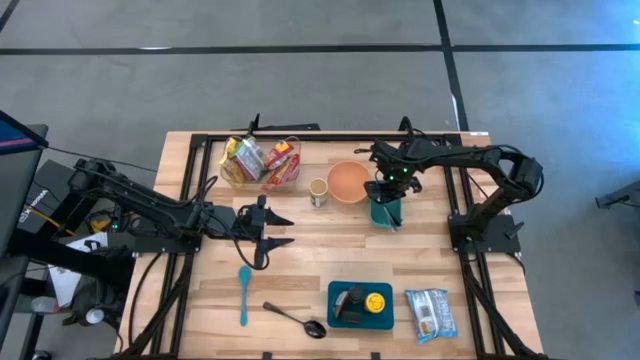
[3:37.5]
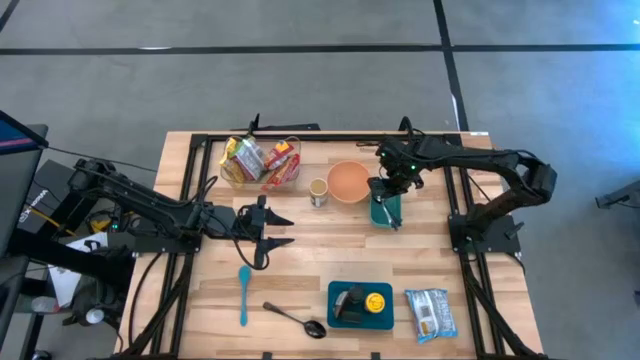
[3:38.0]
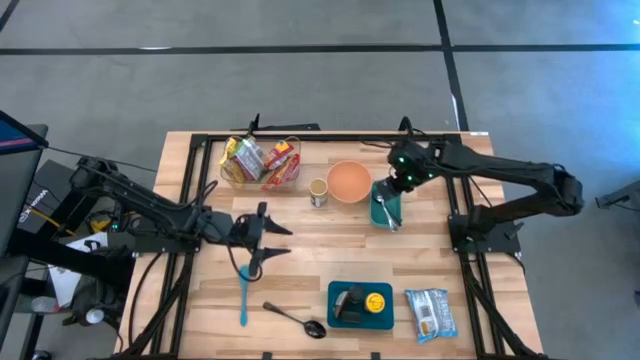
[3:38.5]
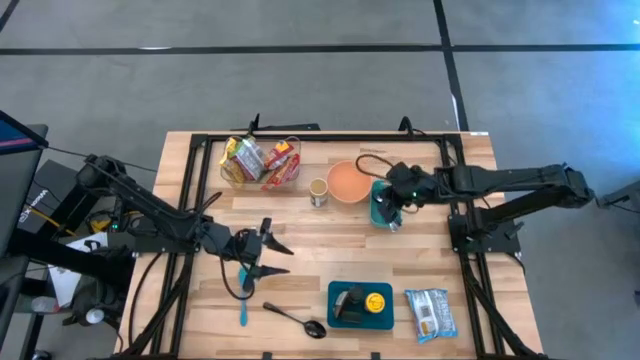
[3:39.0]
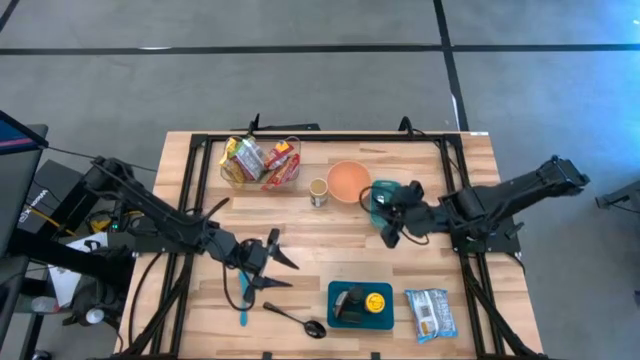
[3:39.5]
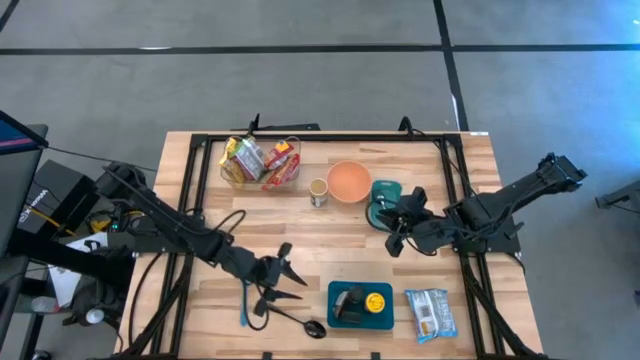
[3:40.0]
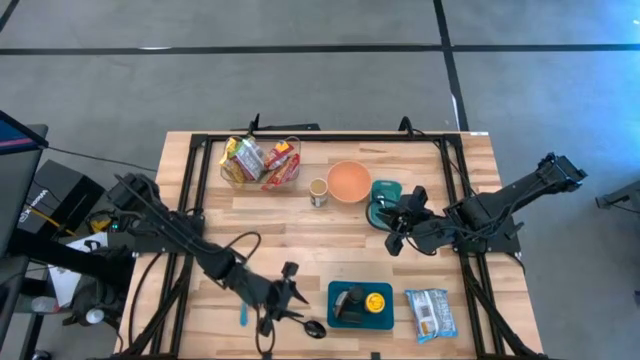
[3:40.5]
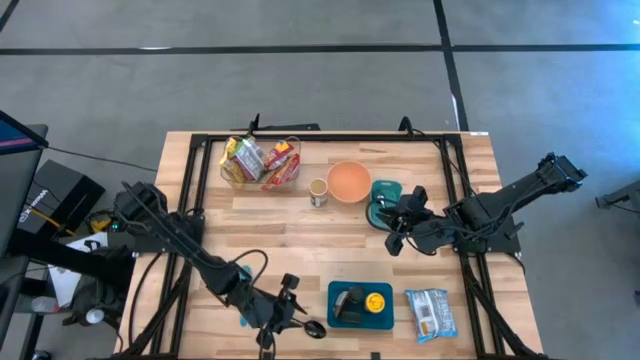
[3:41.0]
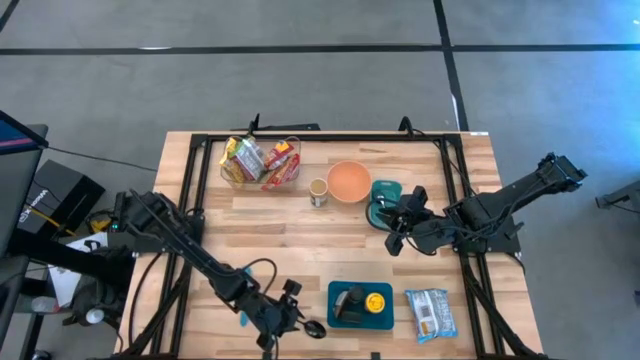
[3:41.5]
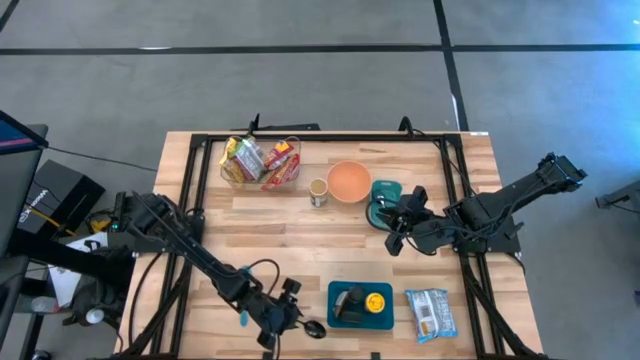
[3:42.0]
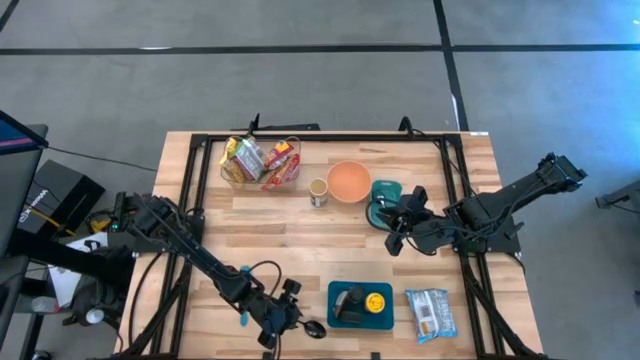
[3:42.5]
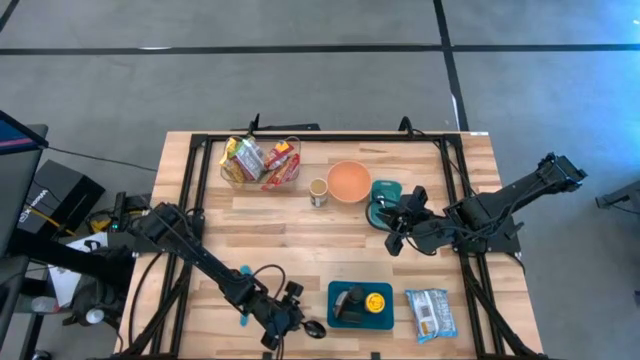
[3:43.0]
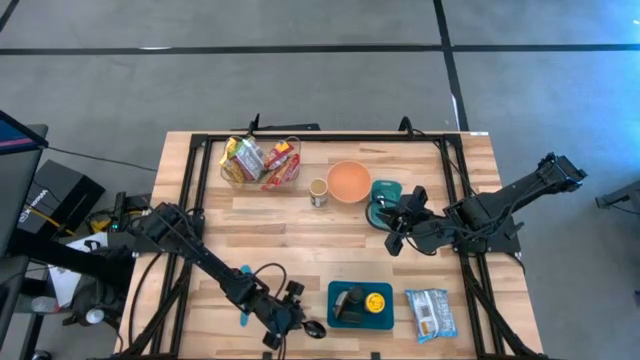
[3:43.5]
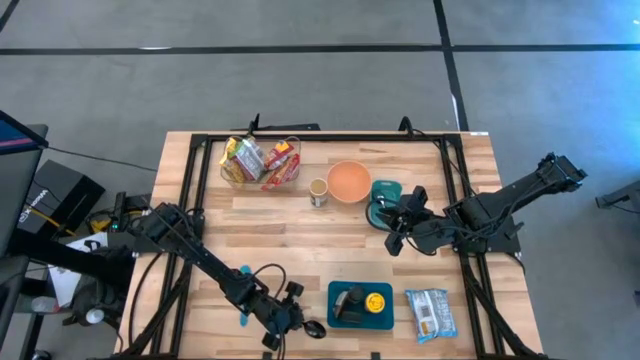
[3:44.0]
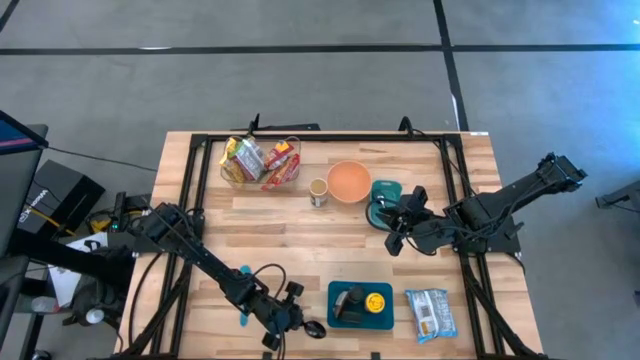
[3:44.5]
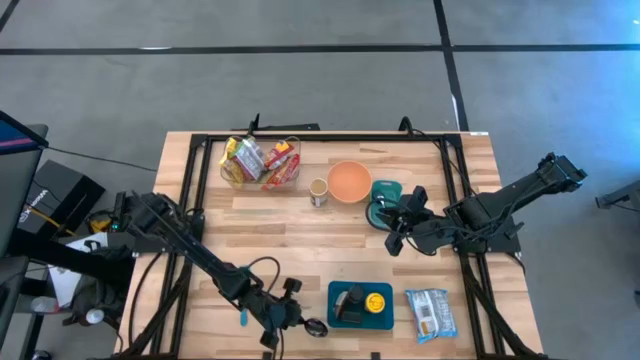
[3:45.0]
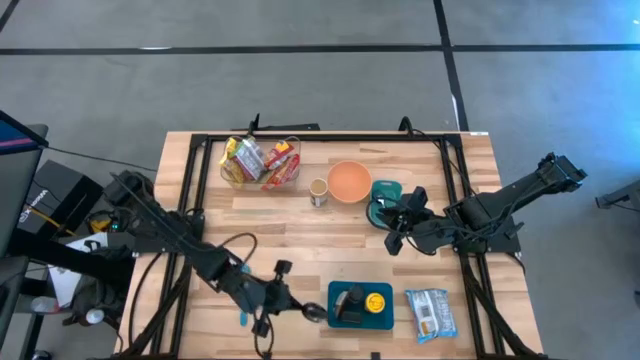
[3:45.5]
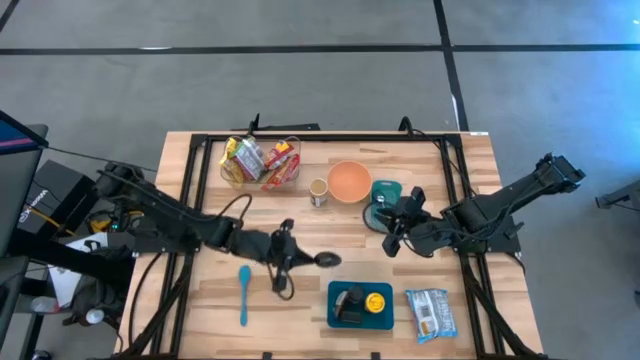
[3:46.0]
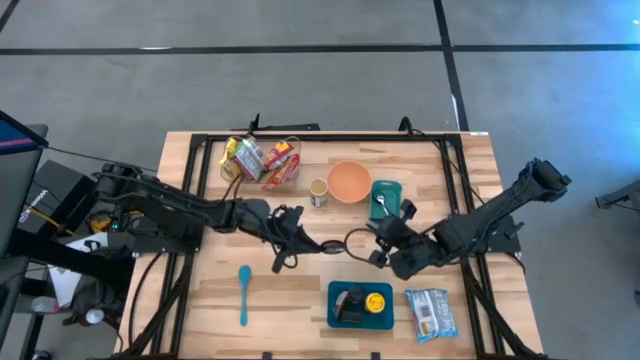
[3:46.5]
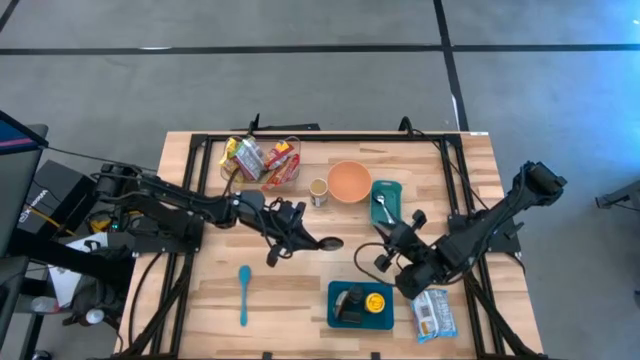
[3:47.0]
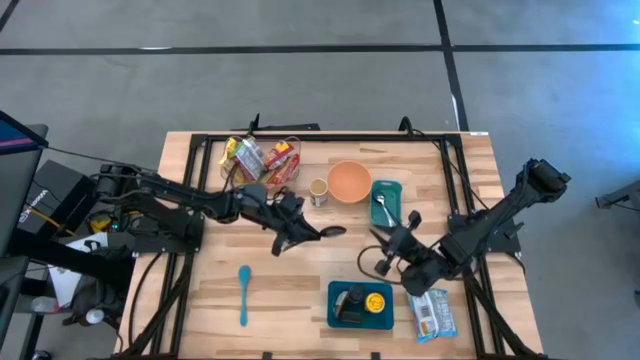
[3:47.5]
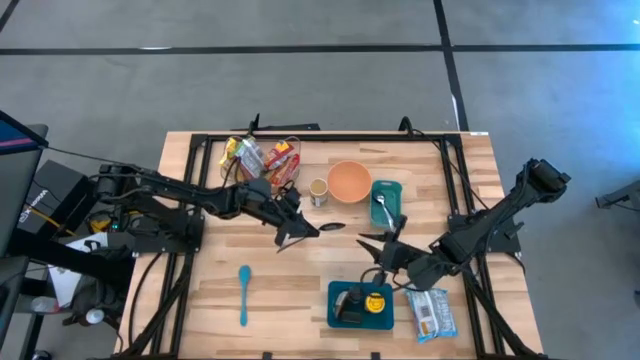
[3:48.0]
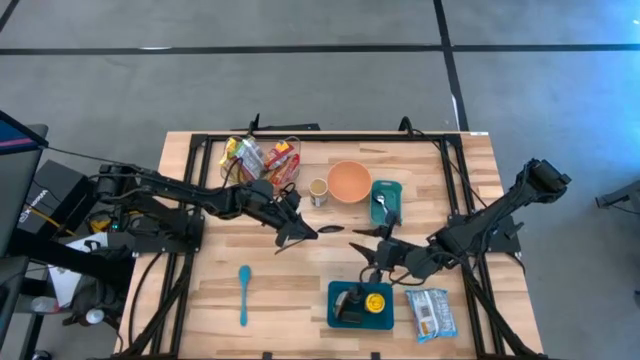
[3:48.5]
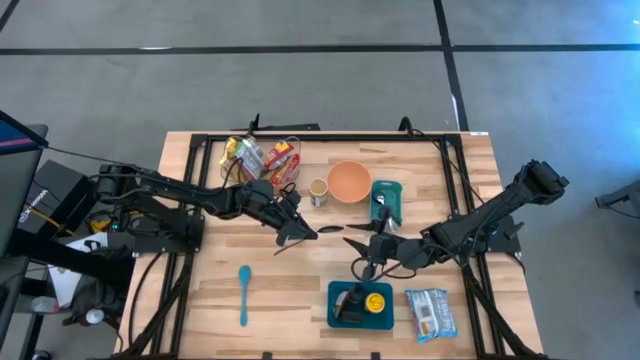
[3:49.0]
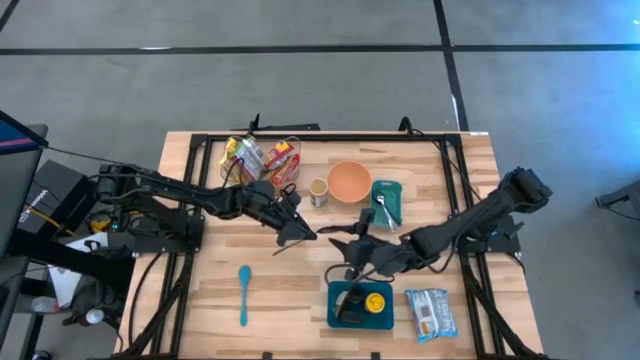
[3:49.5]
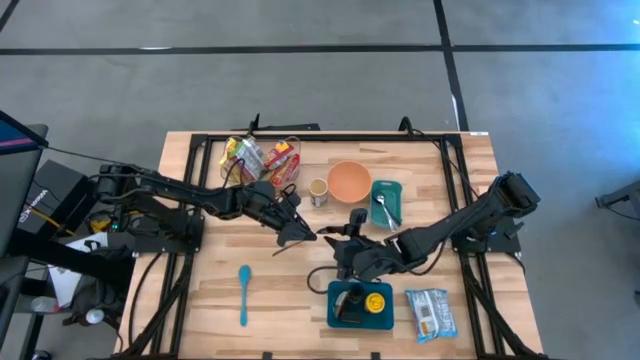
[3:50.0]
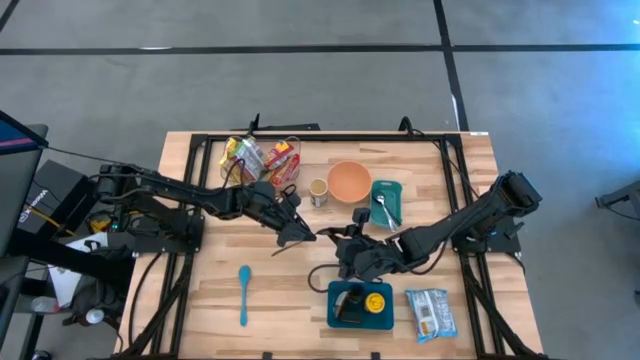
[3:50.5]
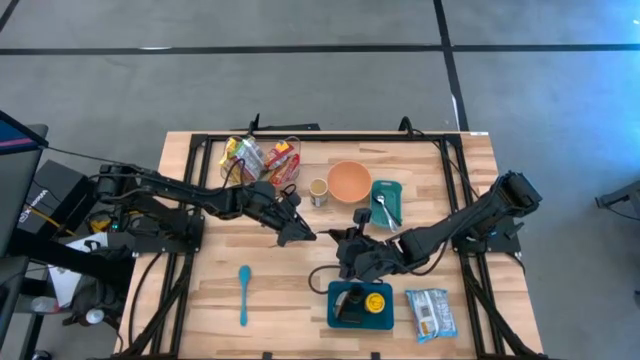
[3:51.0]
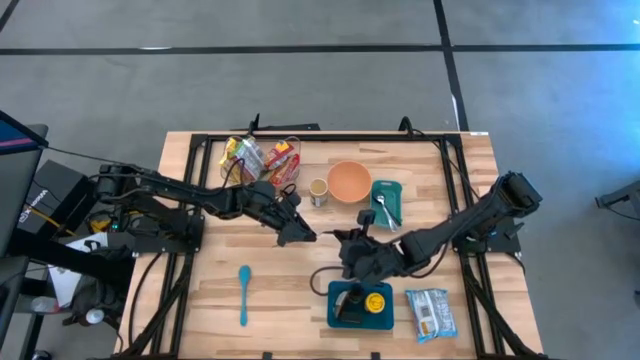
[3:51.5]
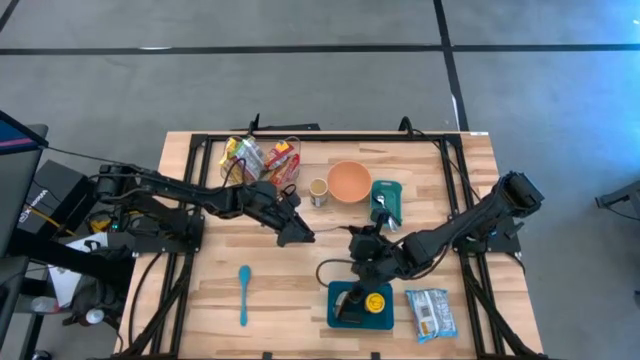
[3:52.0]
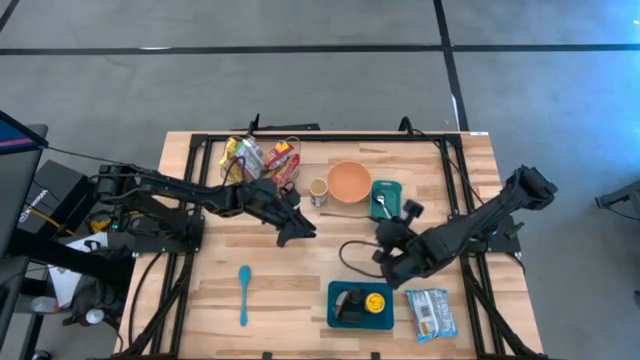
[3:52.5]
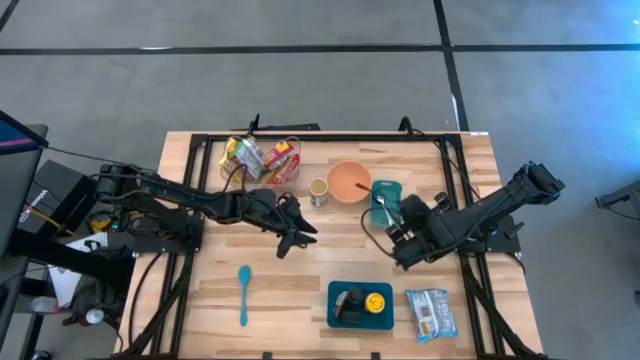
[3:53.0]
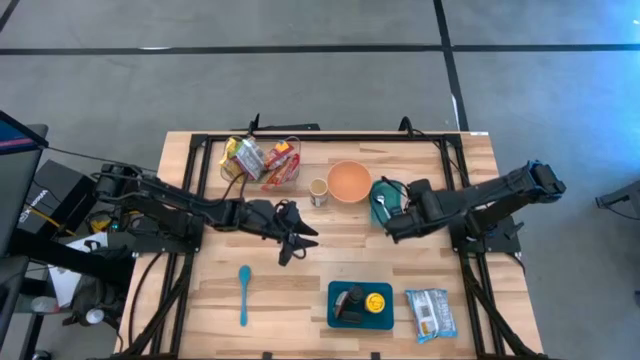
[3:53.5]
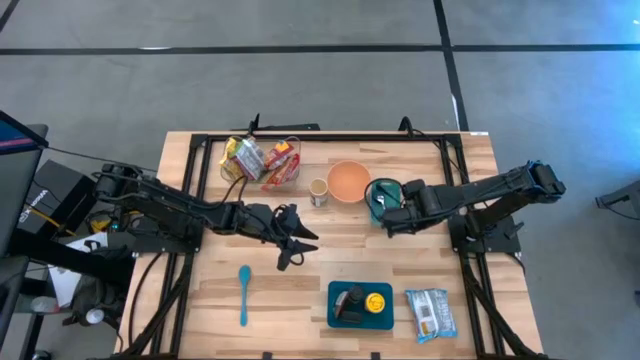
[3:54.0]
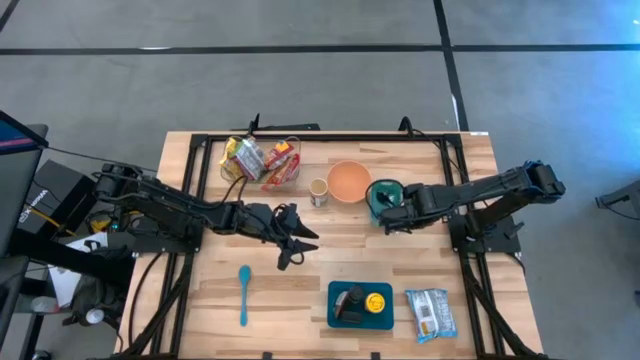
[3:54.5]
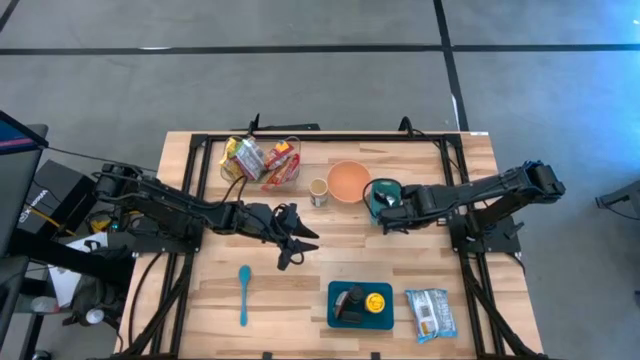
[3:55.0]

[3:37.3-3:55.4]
Task: Pick & Place Food Item
Put the black spoon into the green bin

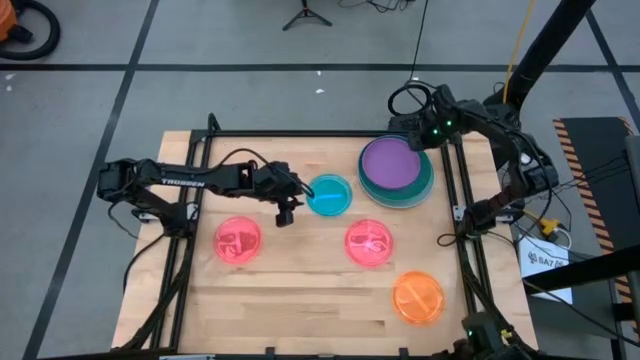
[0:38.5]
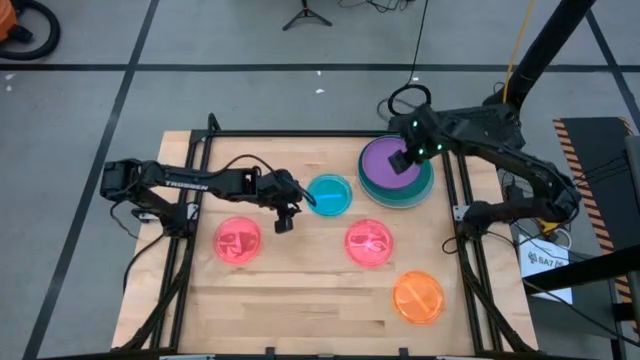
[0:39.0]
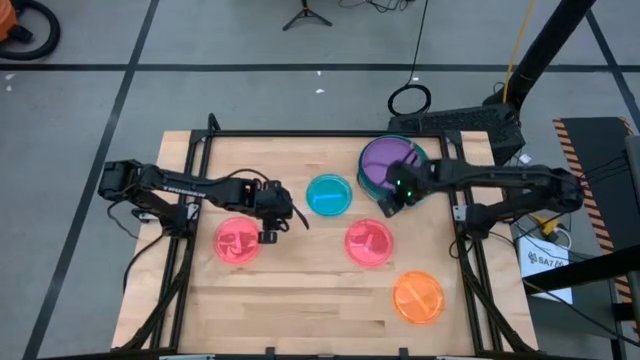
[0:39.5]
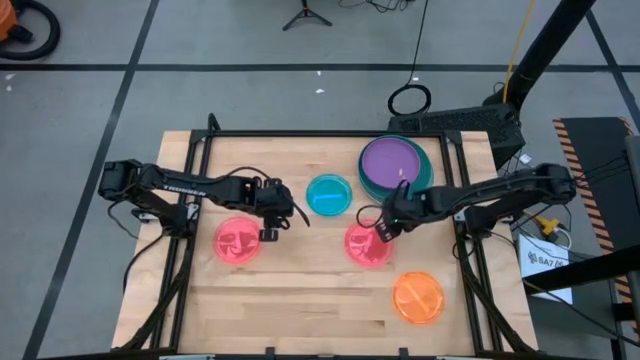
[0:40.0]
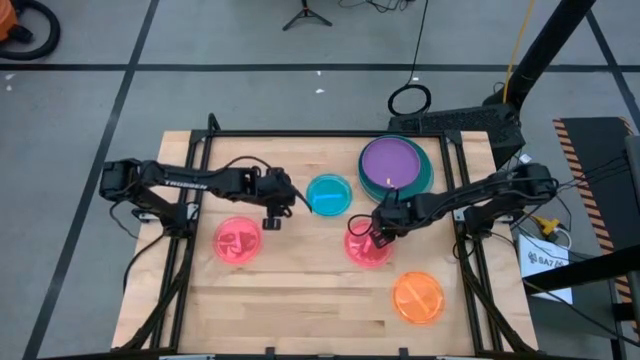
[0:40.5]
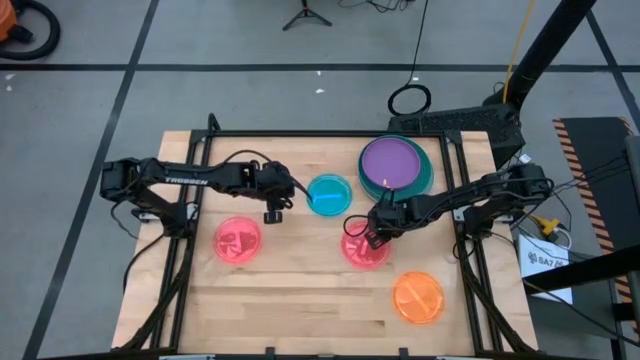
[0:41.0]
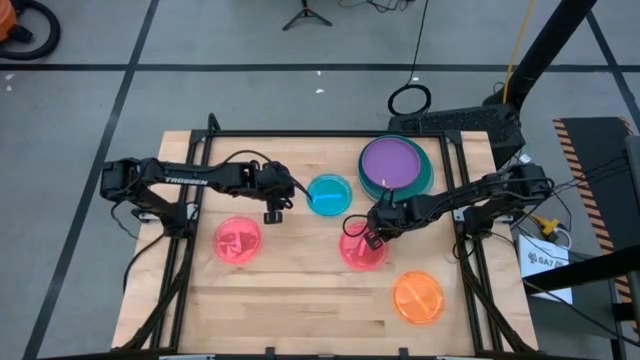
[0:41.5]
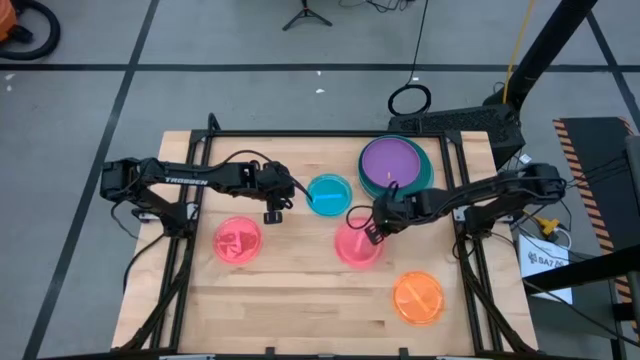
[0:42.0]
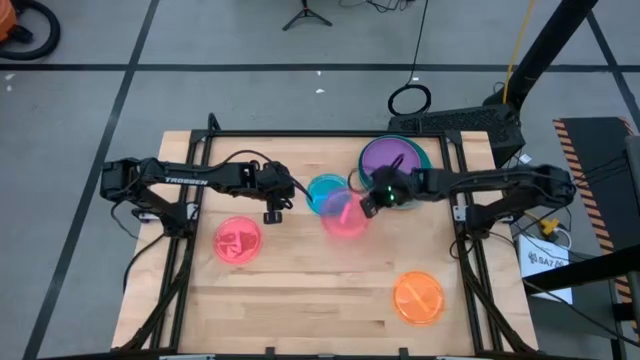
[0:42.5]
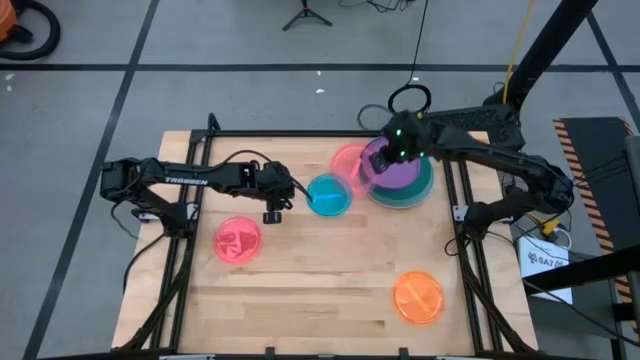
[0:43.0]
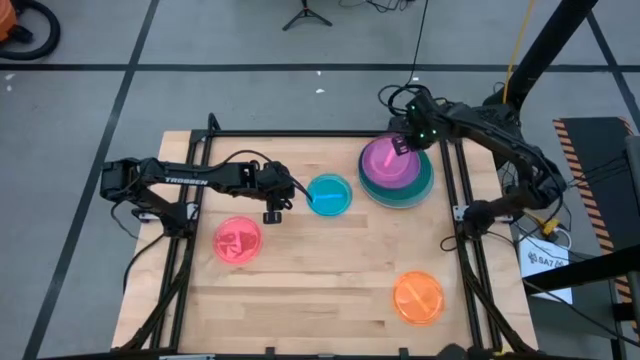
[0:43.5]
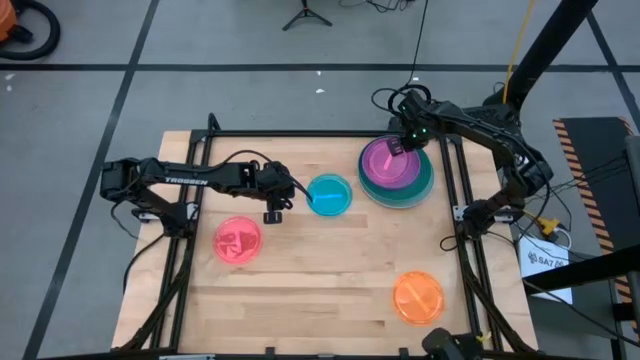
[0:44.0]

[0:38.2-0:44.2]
Task: Stack plastic plates
Stack the right pink plate on top of the purple plate
